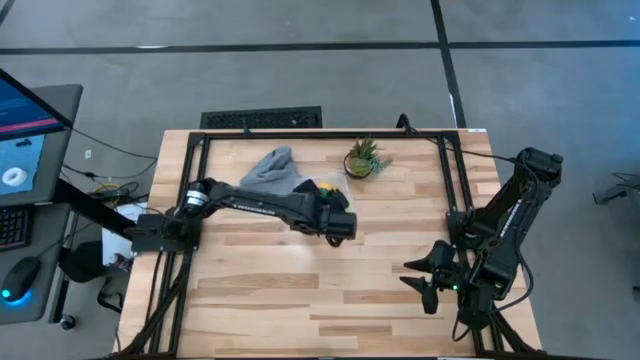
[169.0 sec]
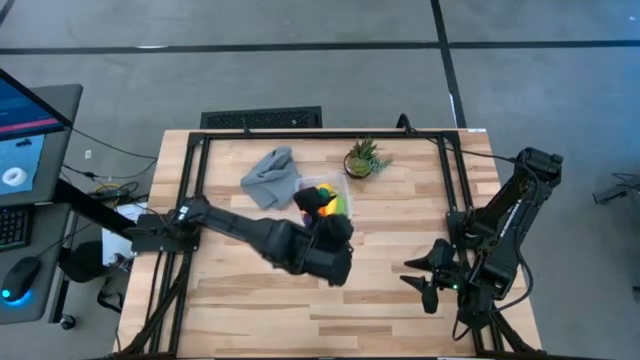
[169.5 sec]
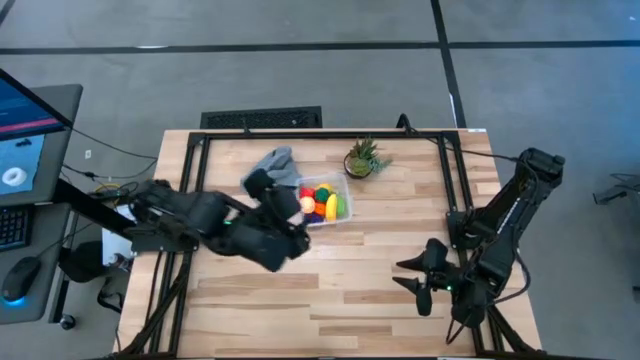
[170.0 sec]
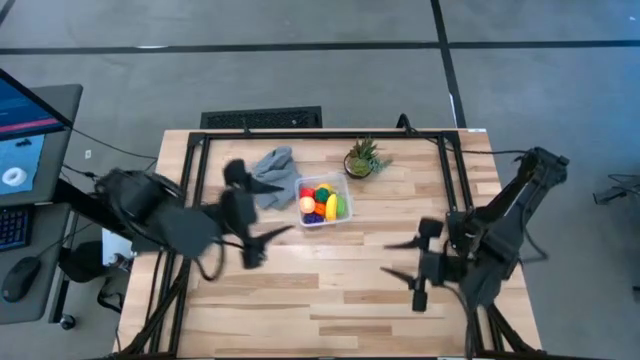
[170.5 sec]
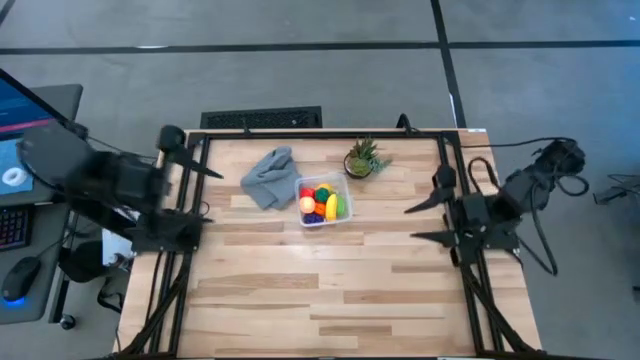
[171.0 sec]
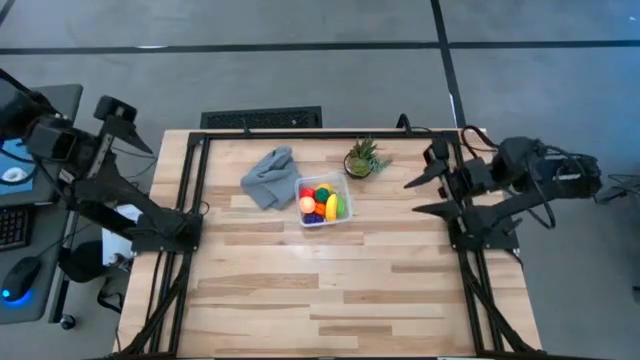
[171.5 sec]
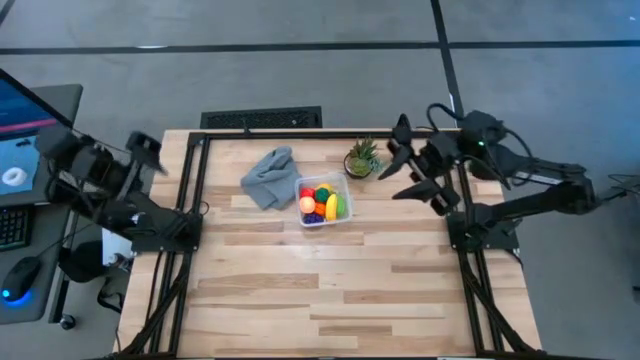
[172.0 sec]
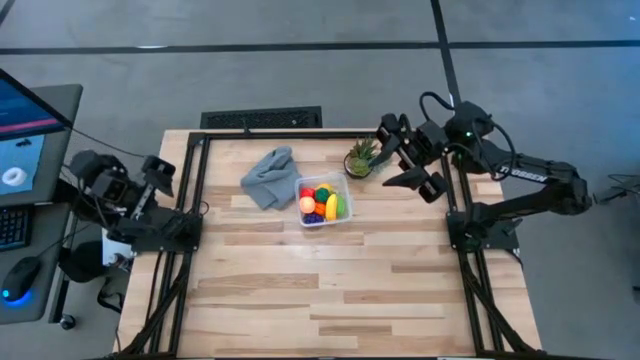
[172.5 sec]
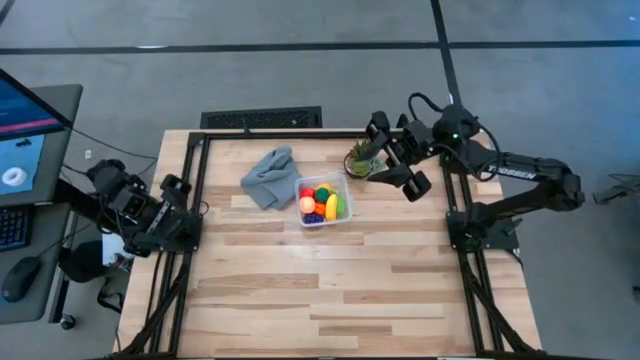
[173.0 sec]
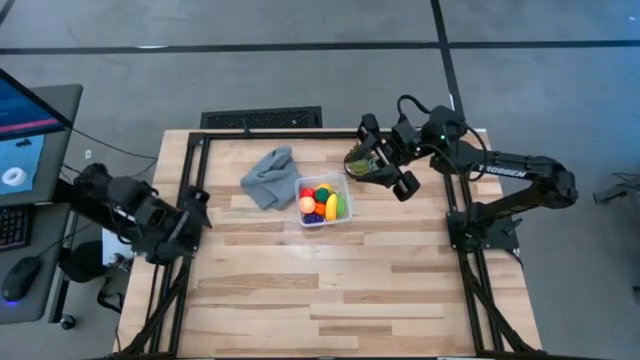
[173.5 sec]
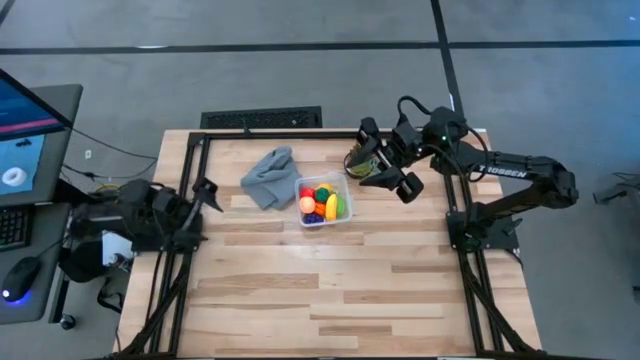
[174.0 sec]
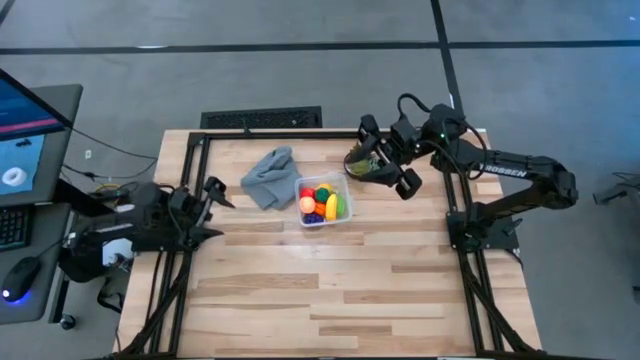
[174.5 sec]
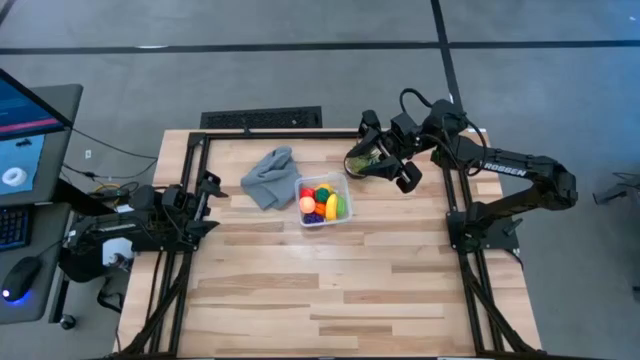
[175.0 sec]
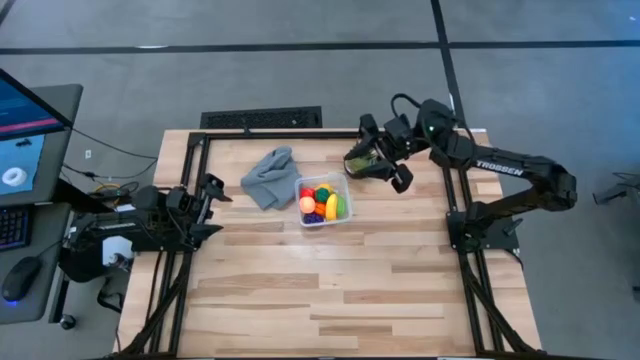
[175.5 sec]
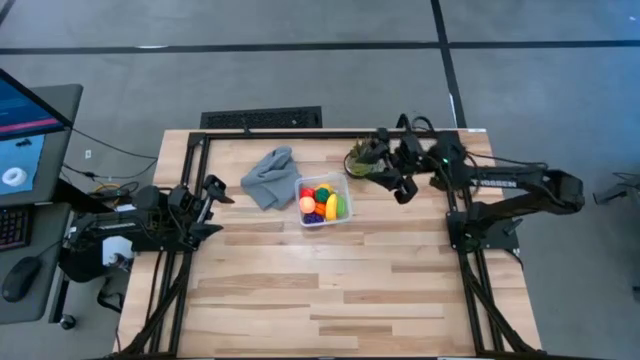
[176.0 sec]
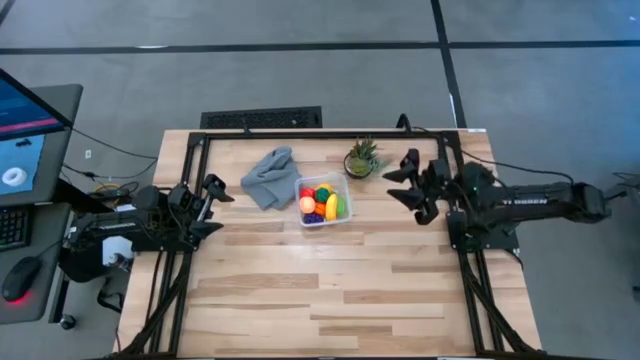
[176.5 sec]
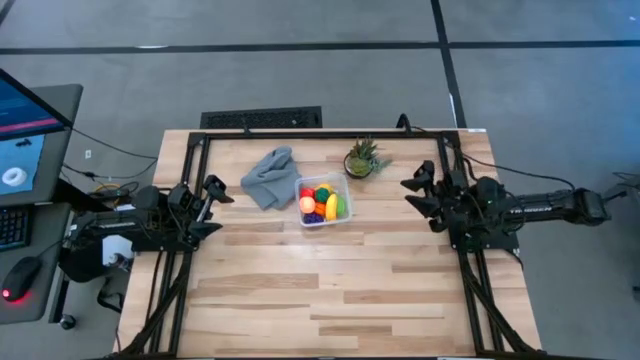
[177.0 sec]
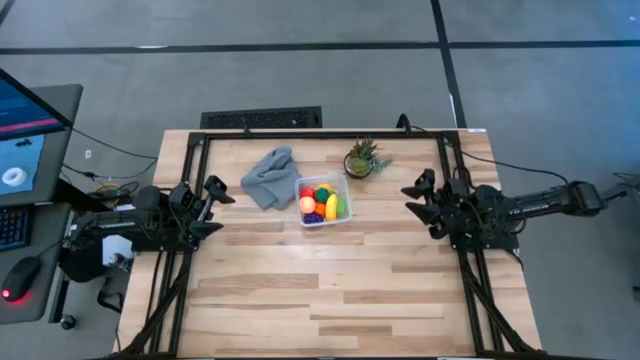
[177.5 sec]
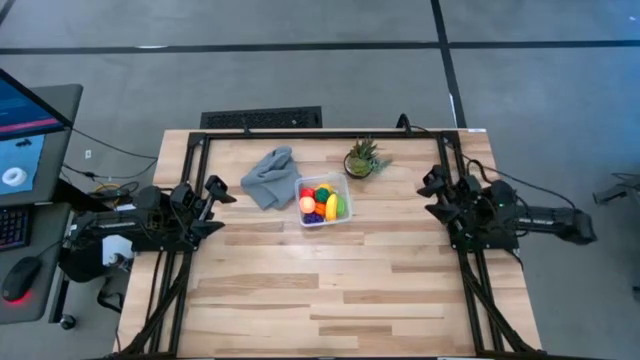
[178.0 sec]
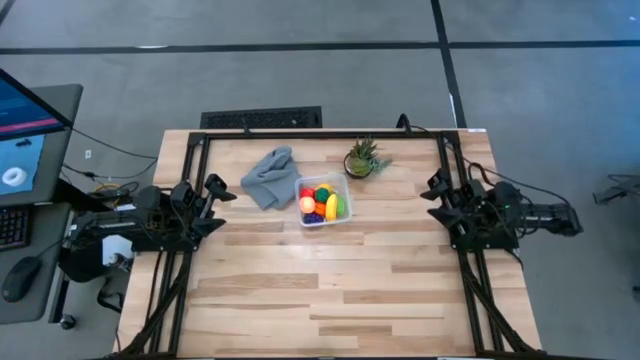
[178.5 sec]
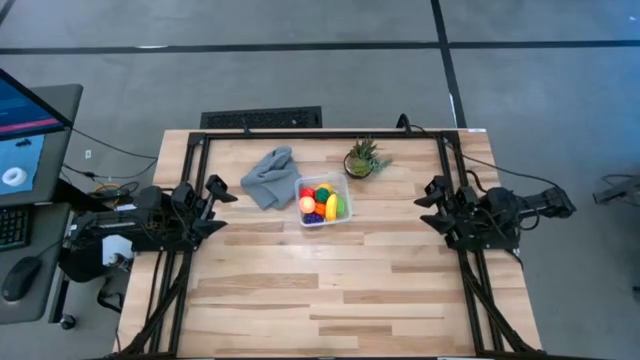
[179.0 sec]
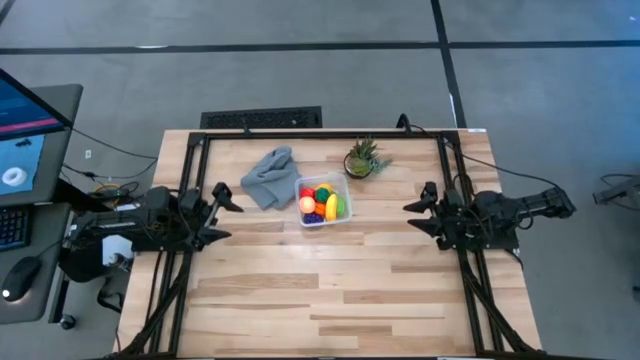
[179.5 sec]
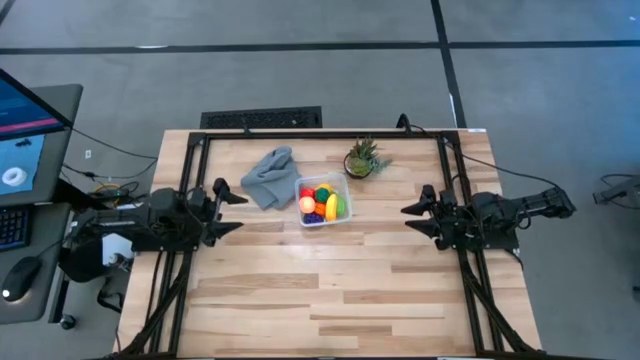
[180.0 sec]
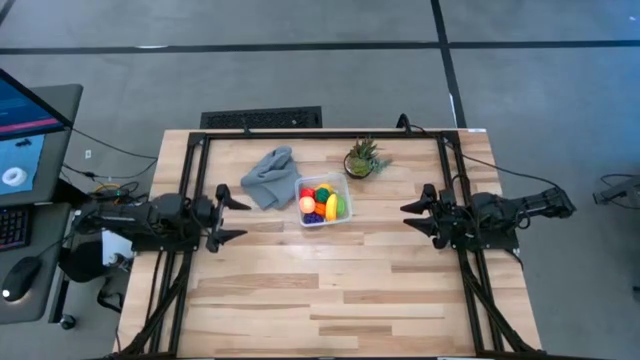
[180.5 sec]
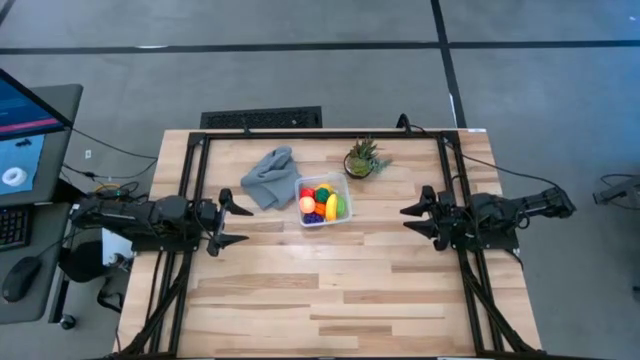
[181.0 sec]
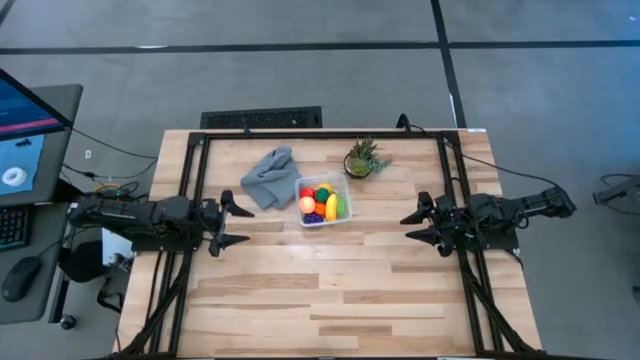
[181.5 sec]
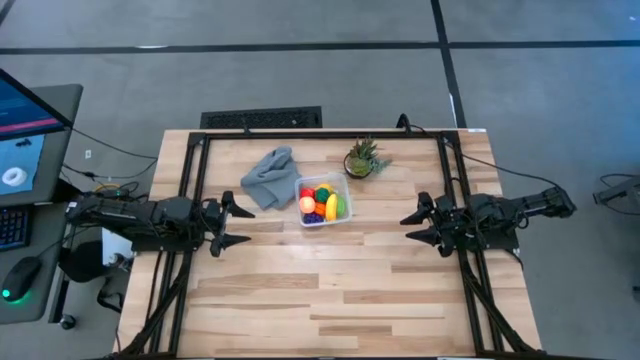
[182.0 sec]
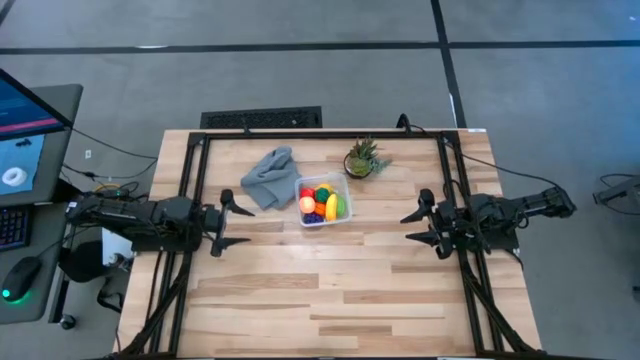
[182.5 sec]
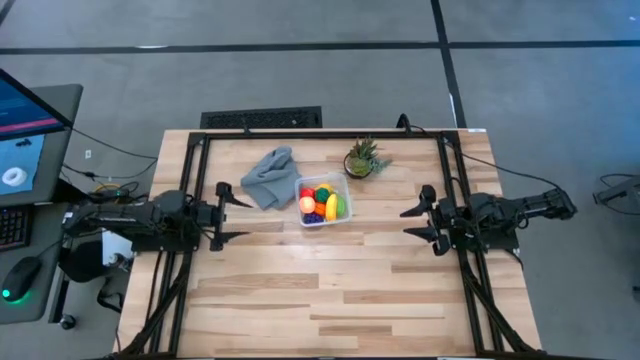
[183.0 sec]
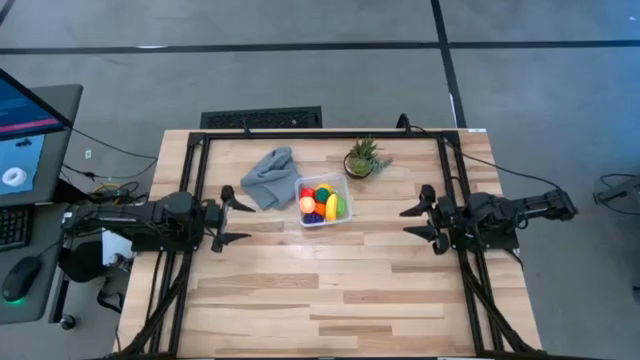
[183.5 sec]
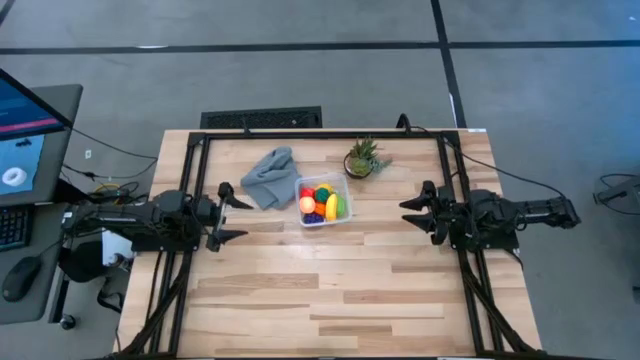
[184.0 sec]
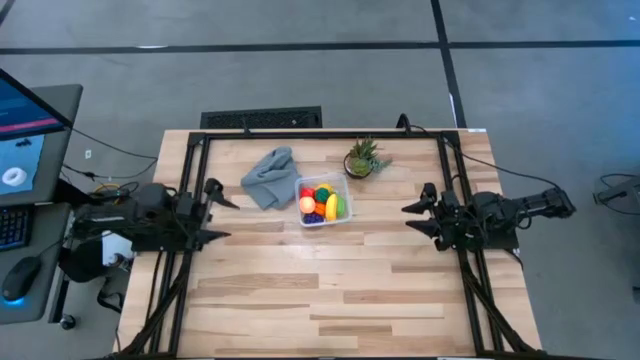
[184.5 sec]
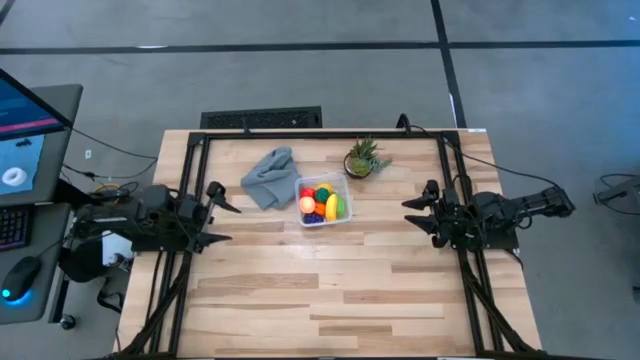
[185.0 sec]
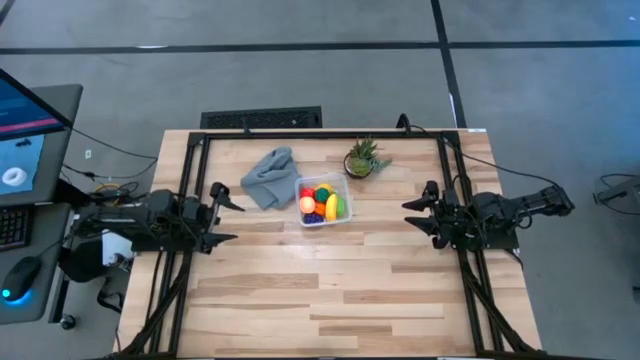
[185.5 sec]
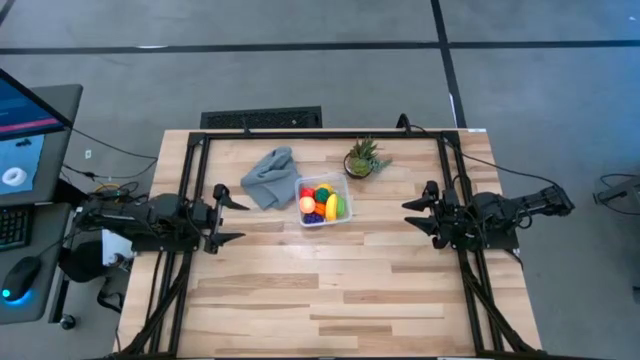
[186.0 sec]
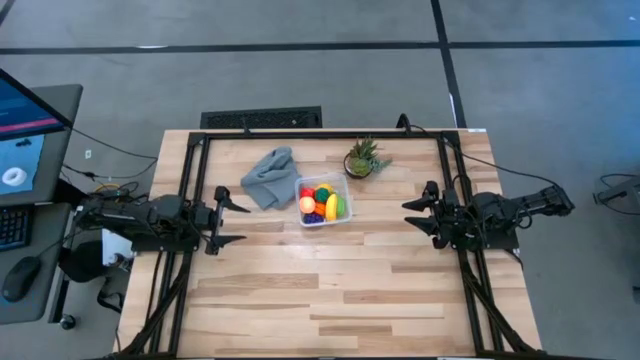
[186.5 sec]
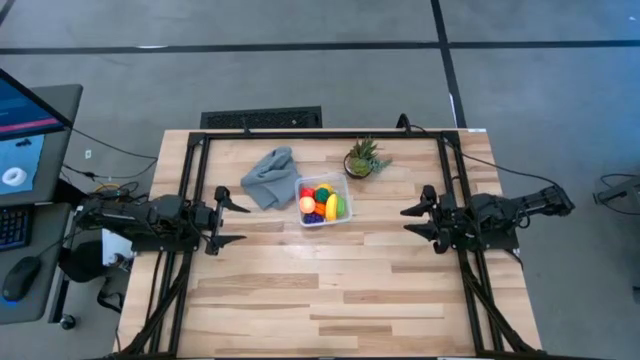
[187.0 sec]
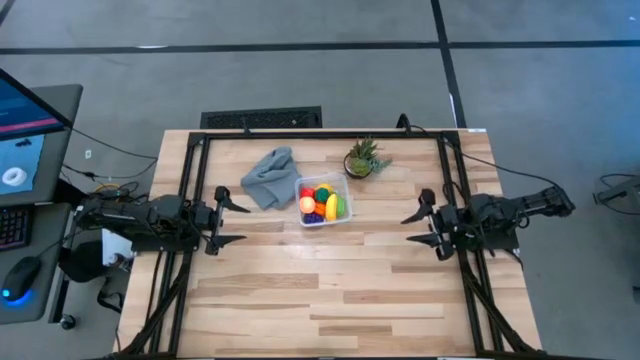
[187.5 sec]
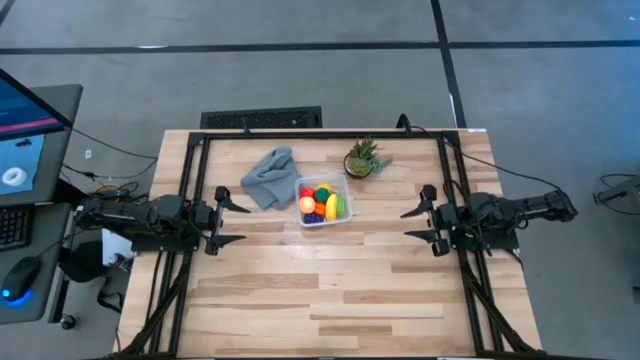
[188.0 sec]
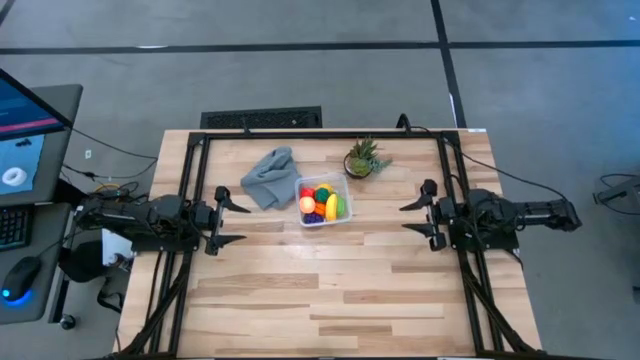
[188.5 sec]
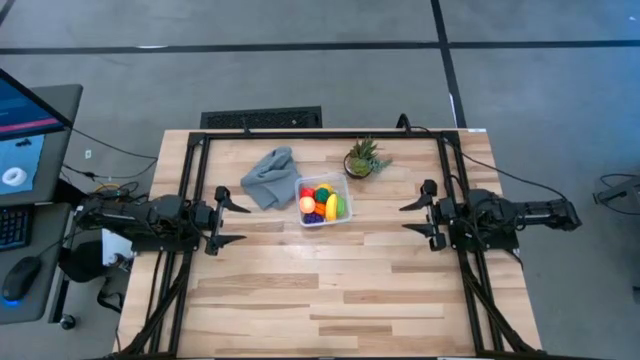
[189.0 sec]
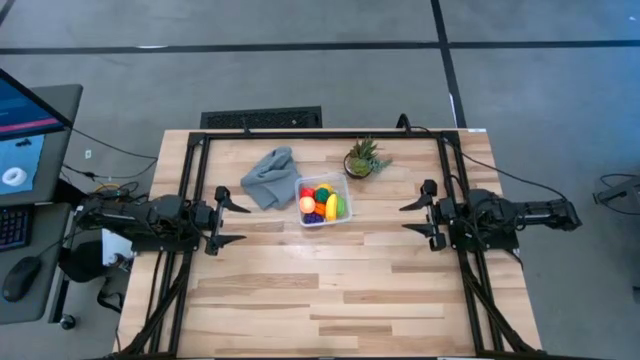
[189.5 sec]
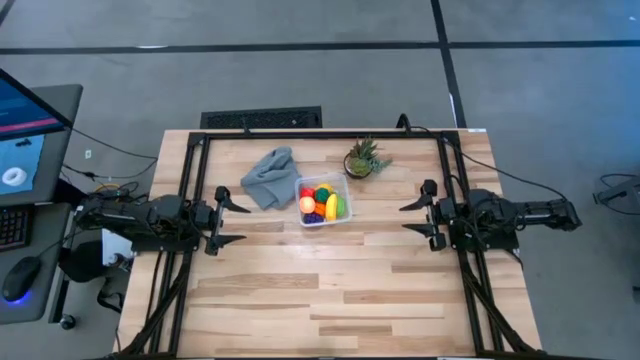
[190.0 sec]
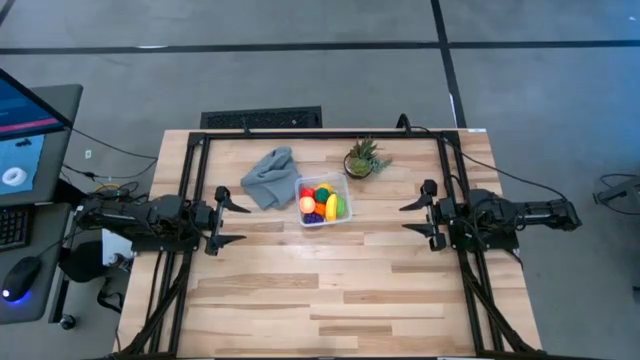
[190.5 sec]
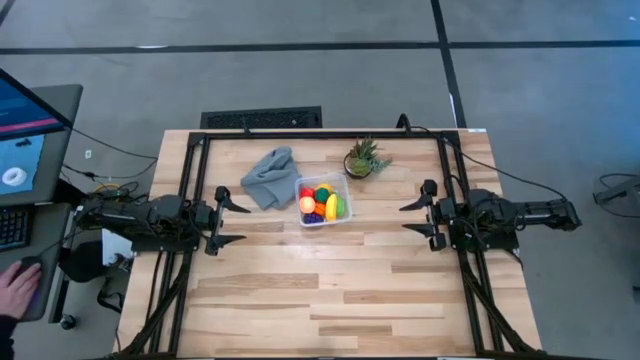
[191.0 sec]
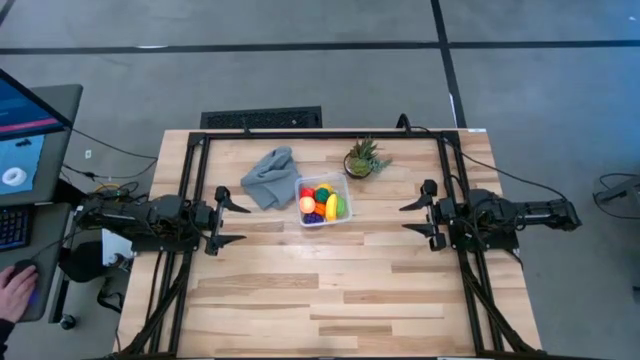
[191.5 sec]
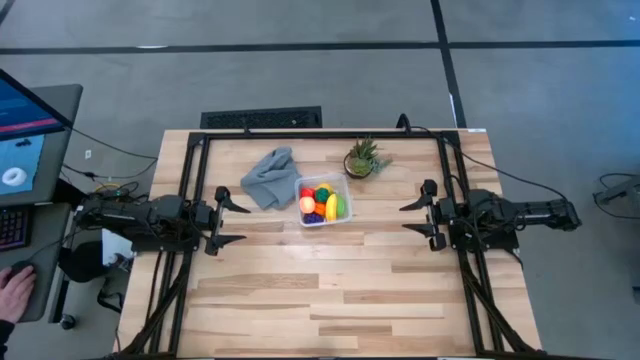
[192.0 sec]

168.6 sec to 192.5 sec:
Task: Pick and placing Produce into tupperware
Return to Home Position
